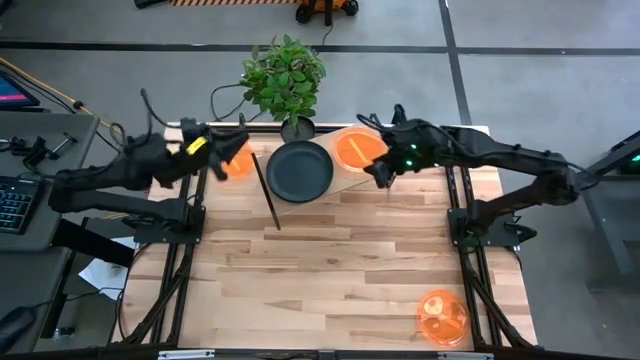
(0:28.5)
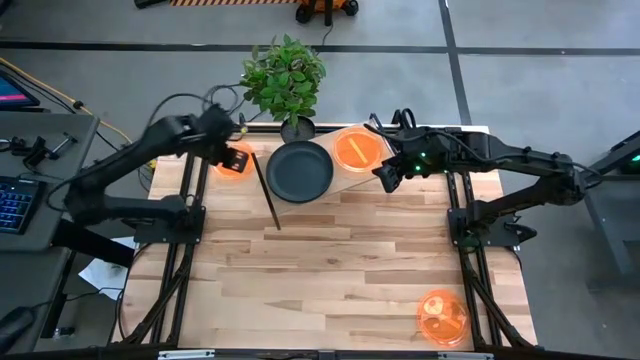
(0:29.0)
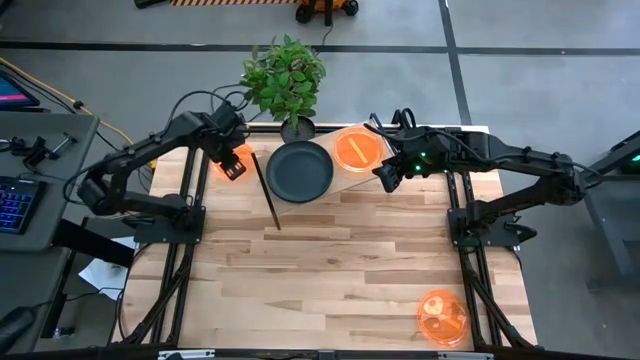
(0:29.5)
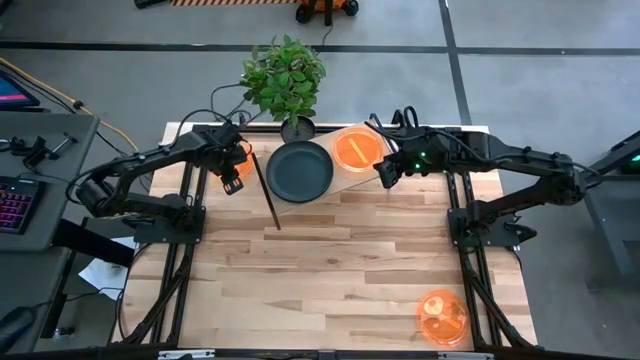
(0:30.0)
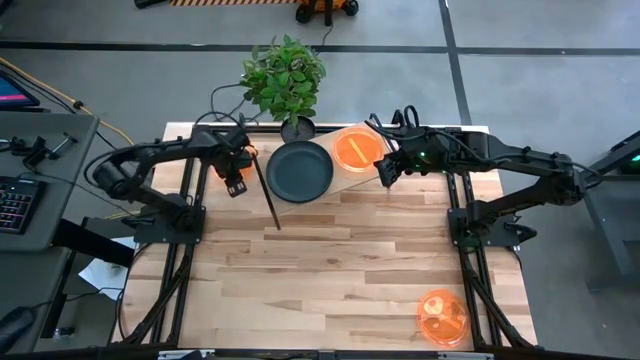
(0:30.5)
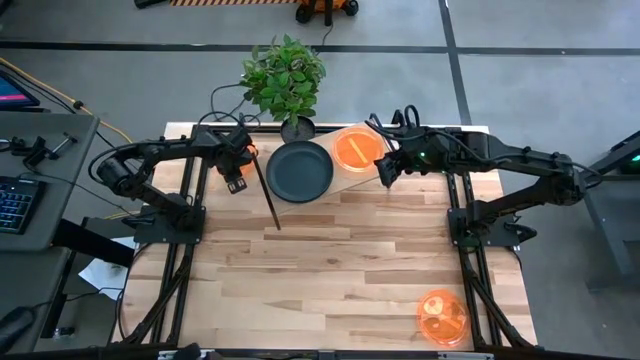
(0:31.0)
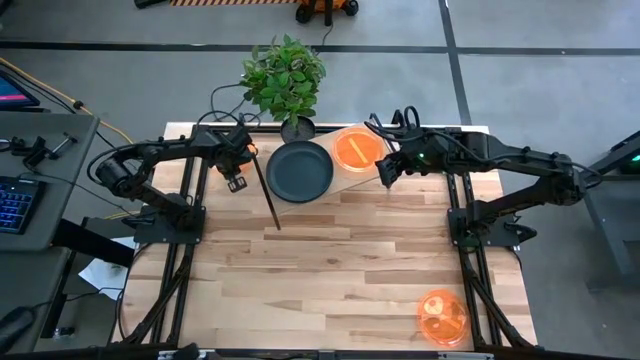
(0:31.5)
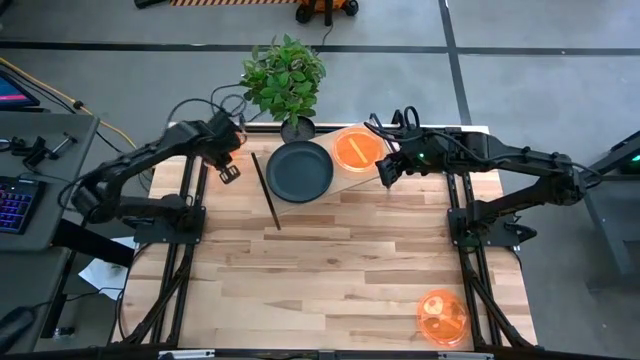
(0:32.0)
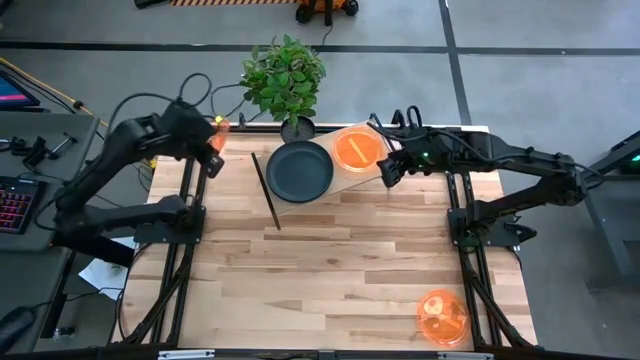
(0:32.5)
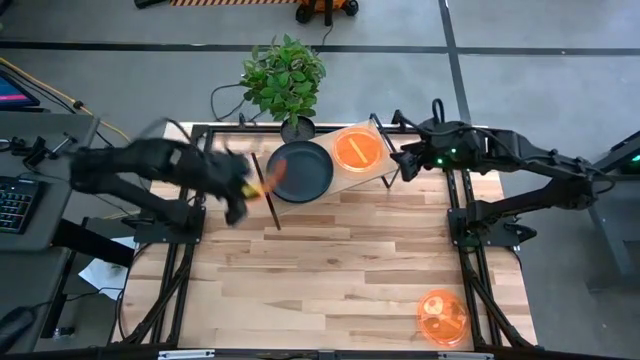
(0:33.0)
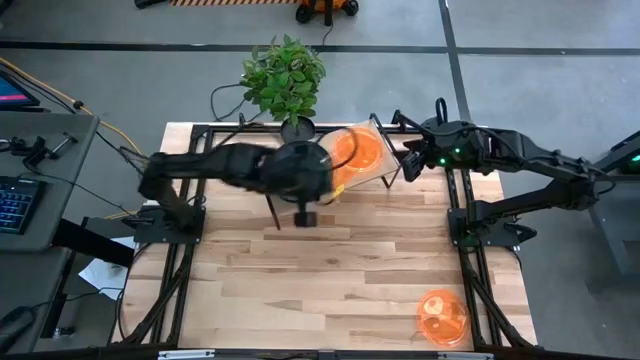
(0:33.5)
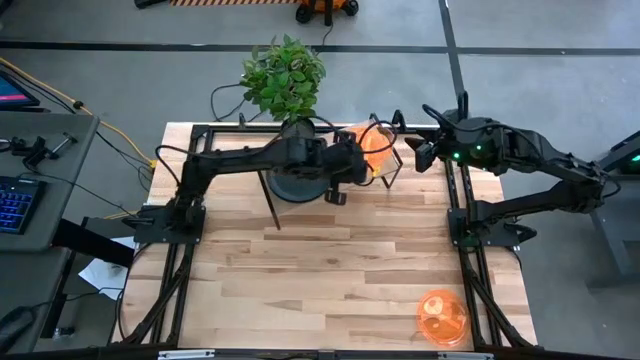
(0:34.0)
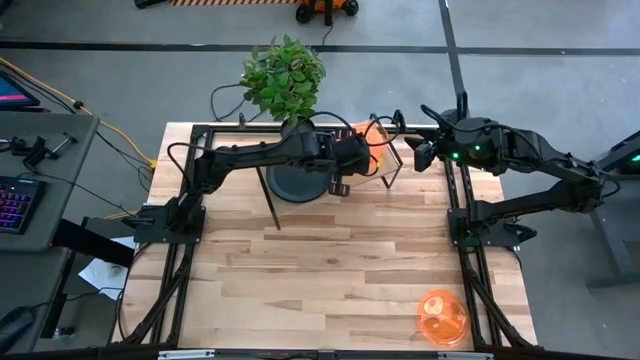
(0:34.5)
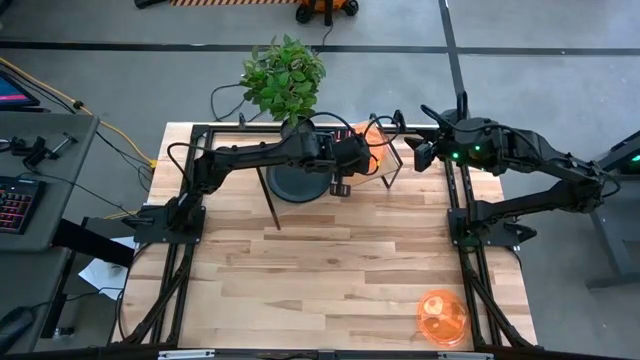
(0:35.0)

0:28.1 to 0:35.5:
Task: Place and stack plates onto a shelf
Stack the top orange plate on top of the orange plate on the shelf

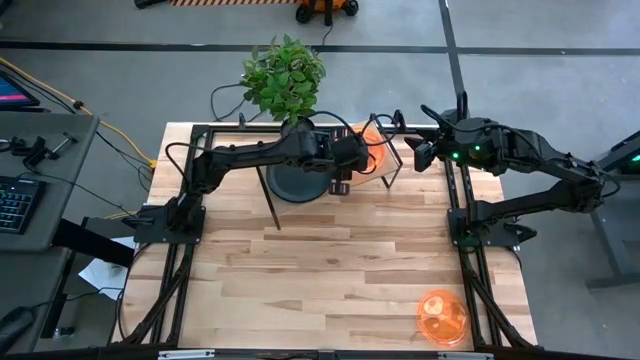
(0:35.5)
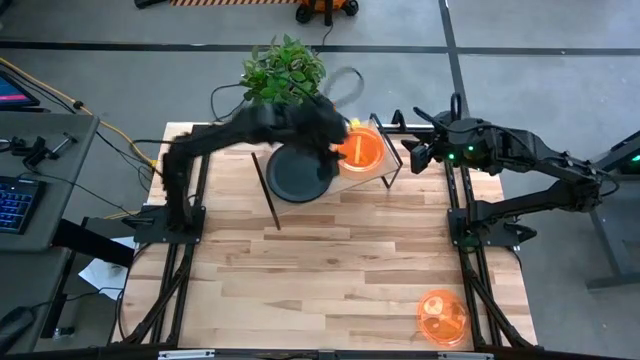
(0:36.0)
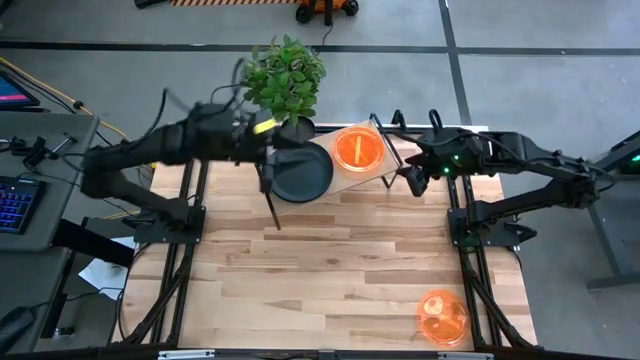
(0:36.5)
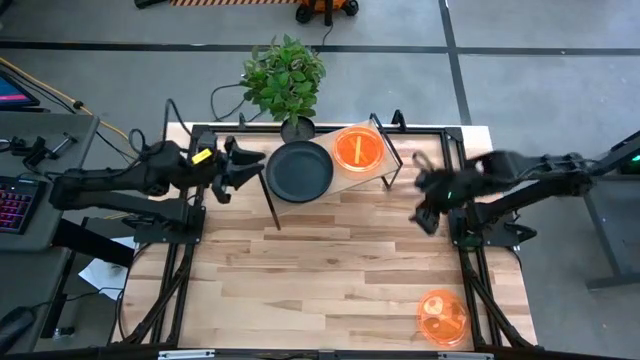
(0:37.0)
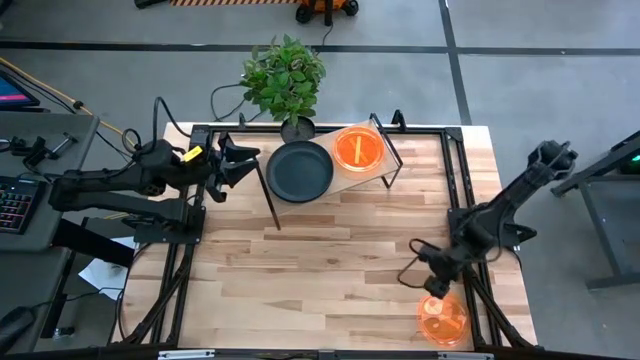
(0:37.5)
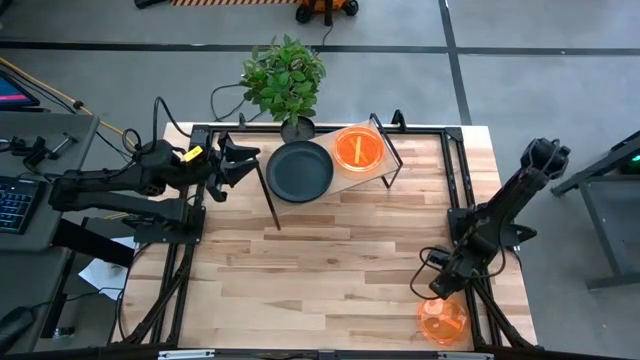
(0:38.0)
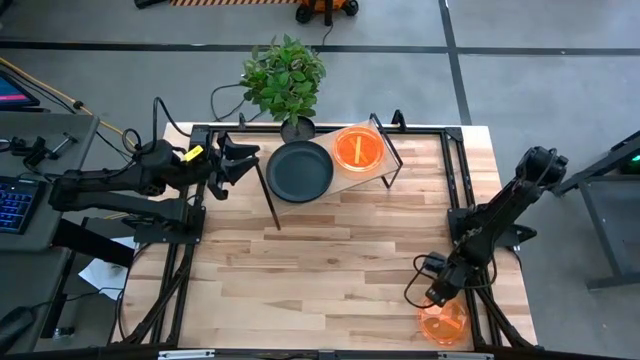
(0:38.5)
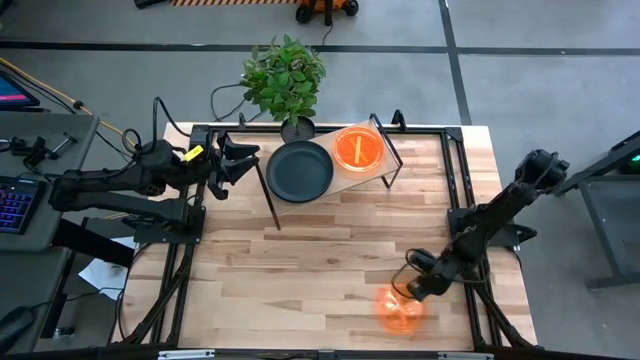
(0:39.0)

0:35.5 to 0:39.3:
Stack the orange plate on the orange stacked plates on the shelf

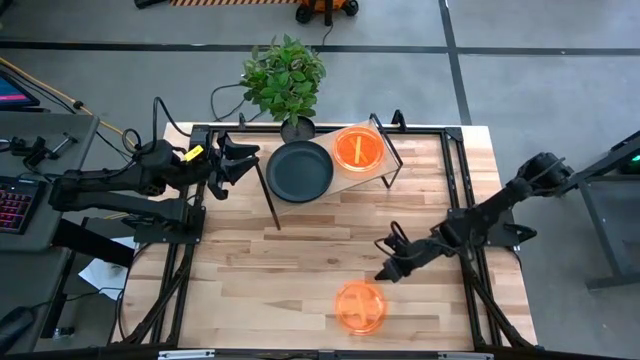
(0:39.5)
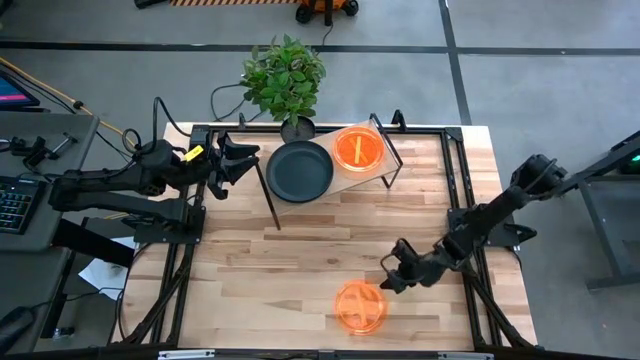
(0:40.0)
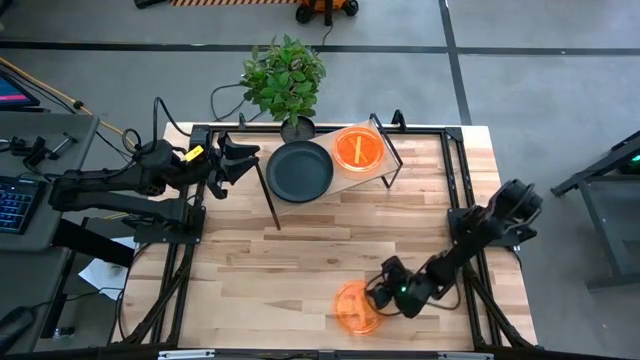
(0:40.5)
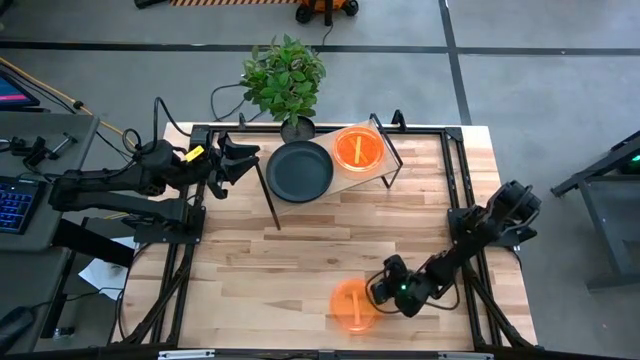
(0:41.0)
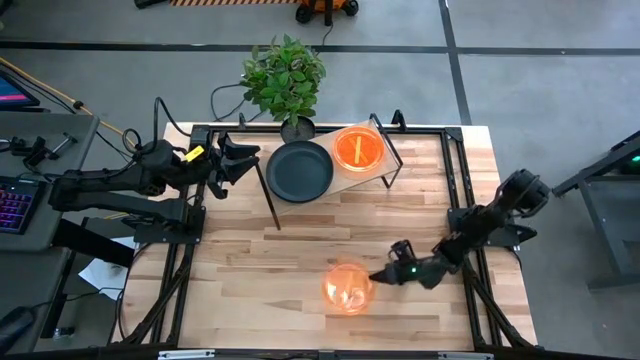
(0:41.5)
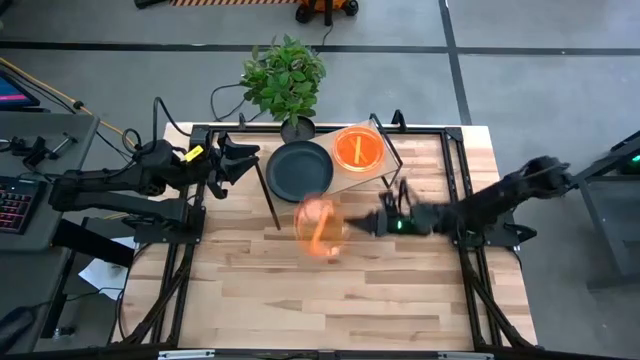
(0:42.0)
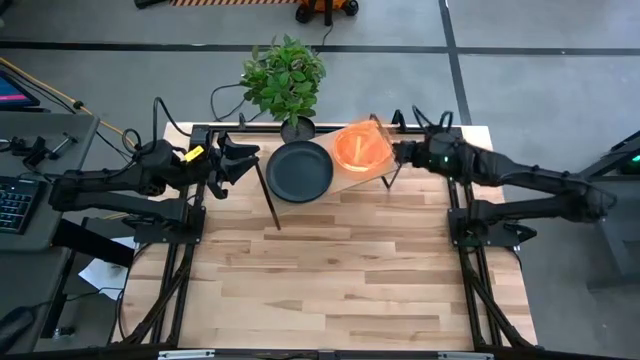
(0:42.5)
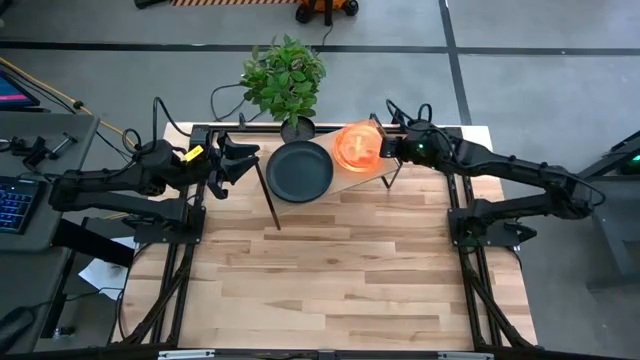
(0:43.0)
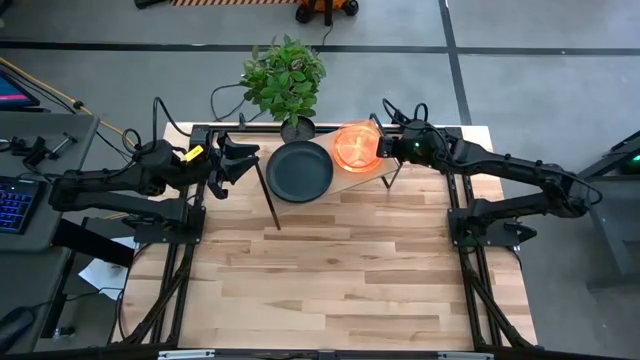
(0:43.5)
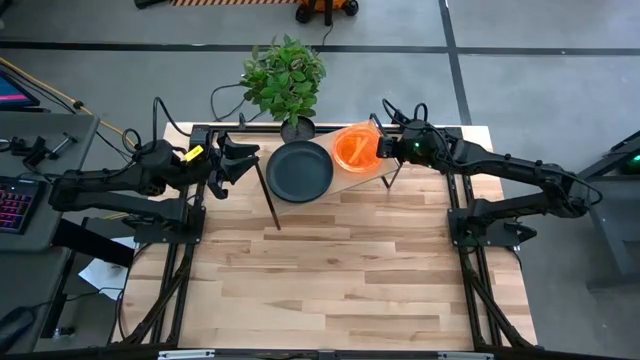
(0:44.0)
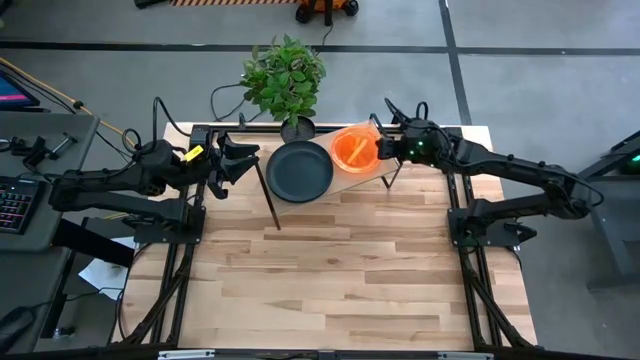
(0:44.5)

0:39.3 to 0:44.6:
Stack the orange plate on top of the orange plate on the shelf

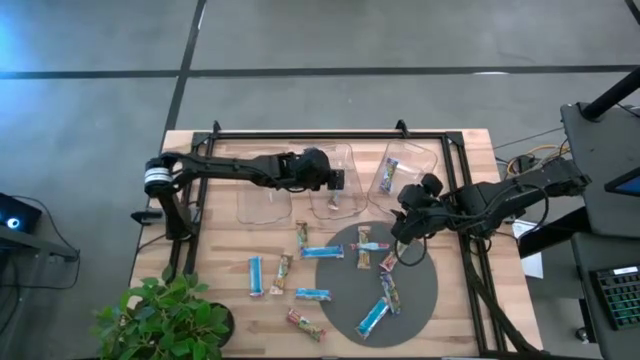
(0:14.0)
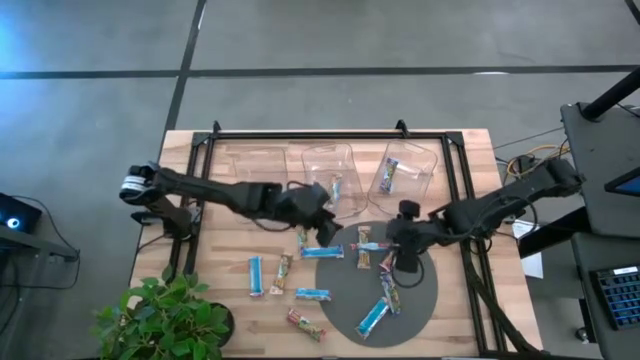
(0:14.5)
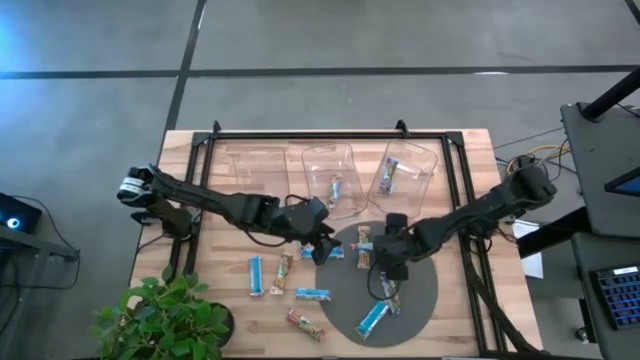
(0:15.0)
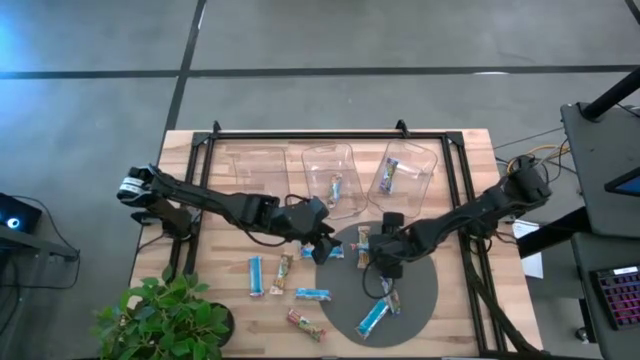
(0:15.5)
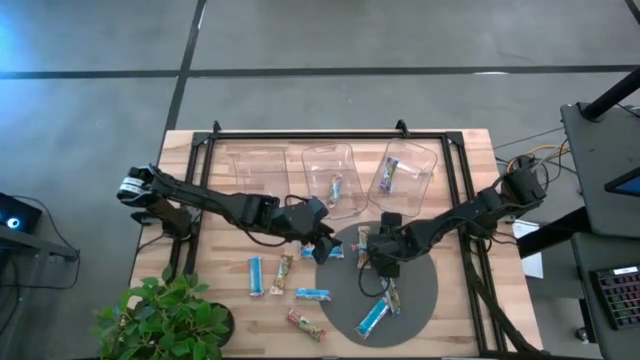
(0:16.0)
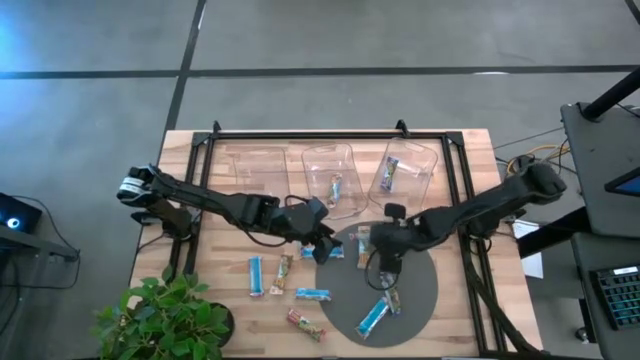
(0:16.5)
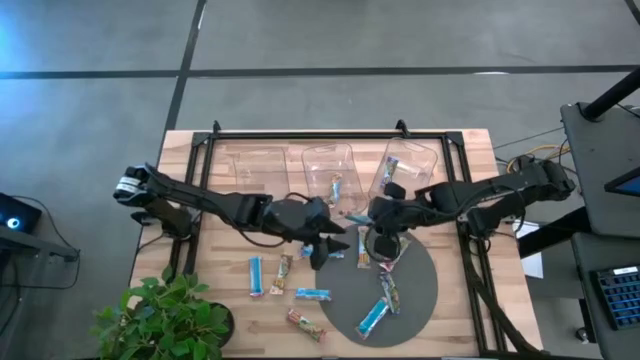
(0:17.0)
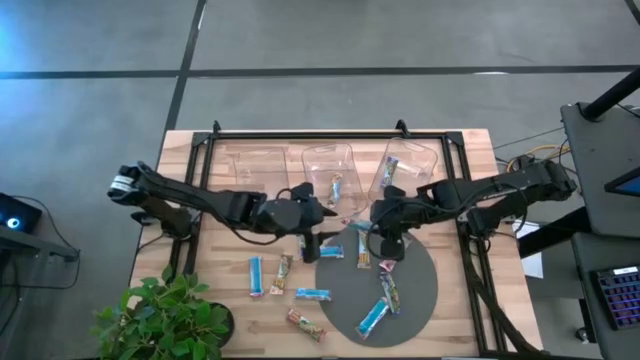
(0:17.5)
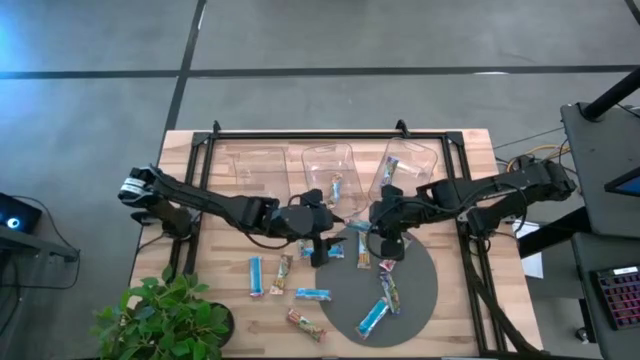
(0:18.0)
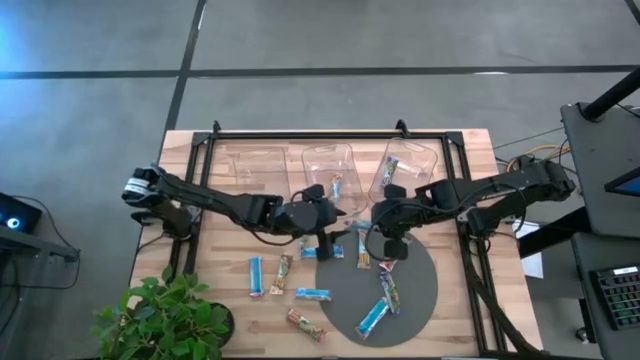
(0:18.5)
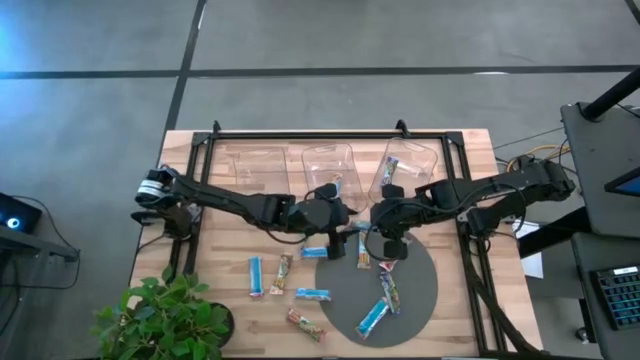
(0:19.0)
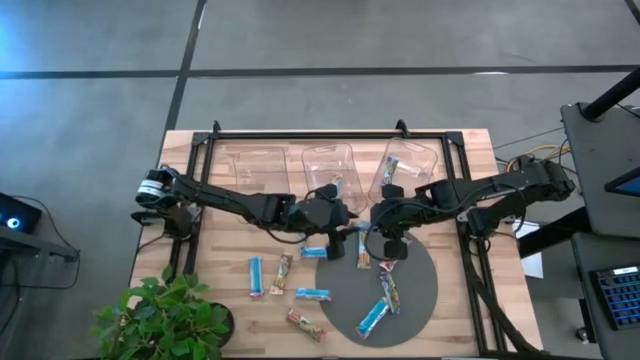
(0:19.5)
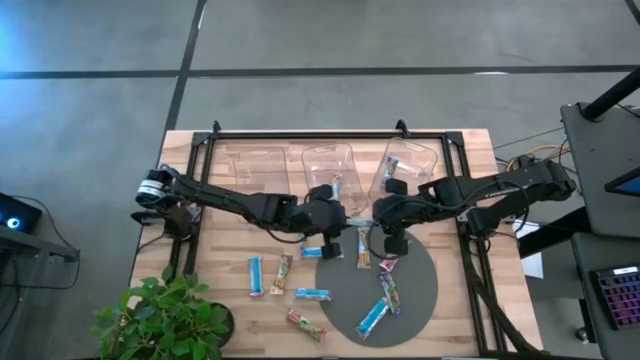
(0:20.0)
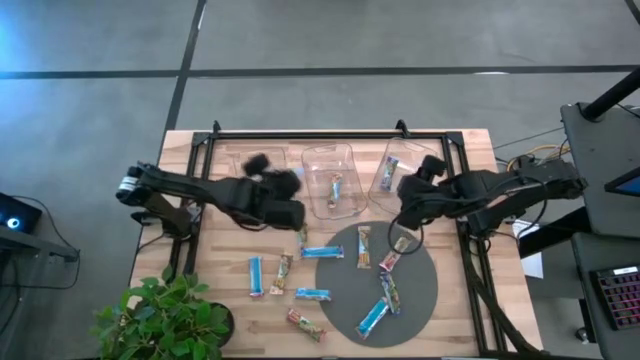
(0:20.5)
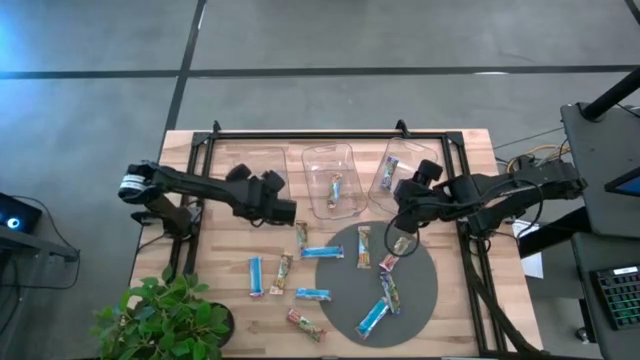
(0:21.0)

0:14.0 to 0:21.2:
Task: Pick and place Granola Bars by type
Put the red granola bar into the left transparent bin
